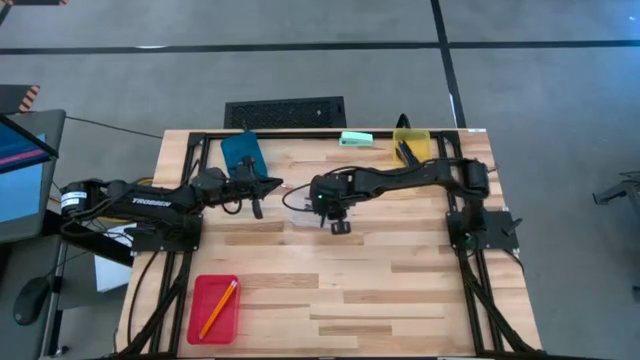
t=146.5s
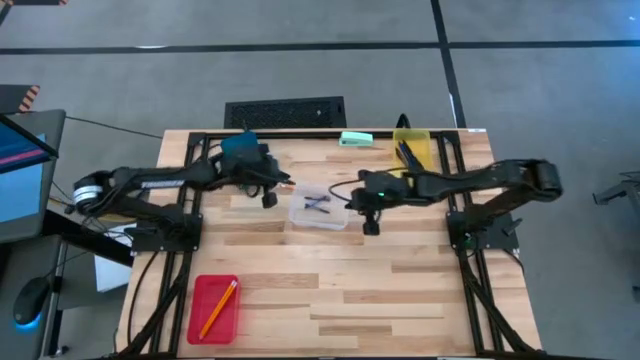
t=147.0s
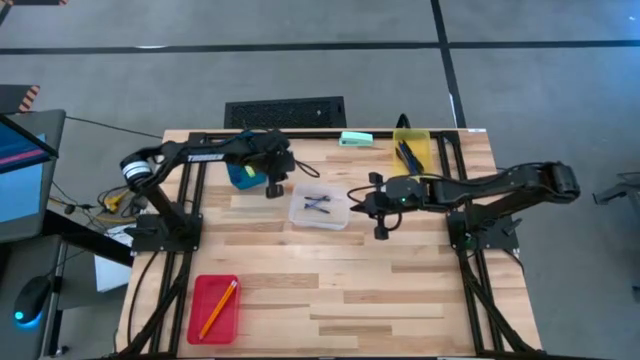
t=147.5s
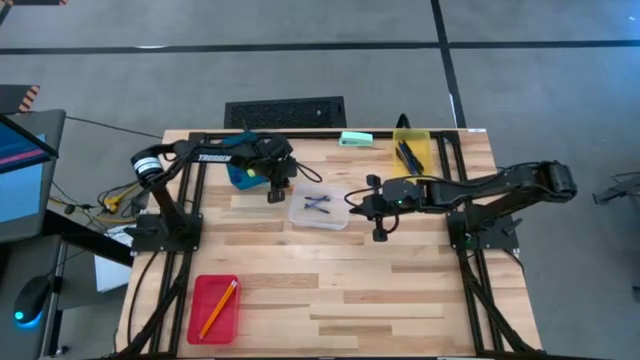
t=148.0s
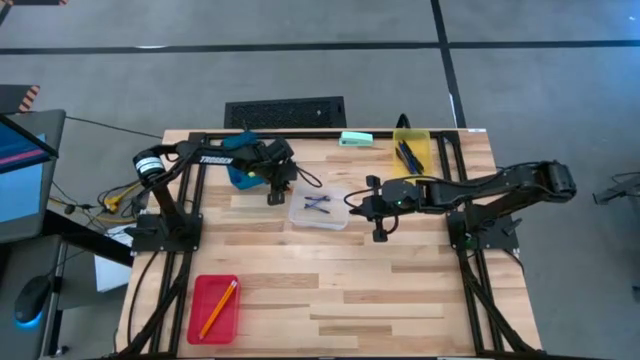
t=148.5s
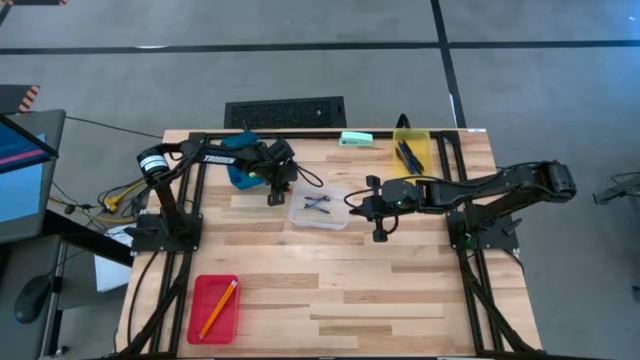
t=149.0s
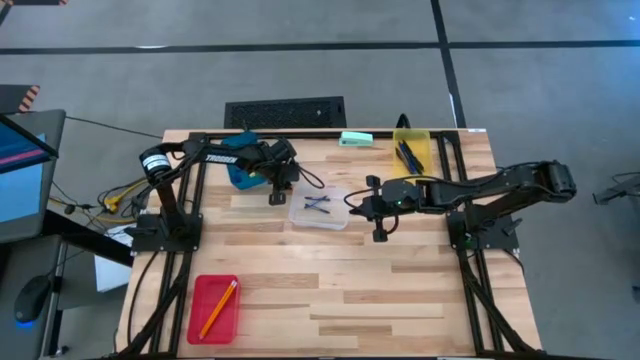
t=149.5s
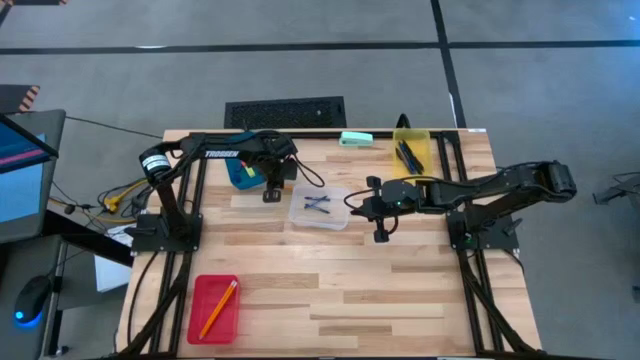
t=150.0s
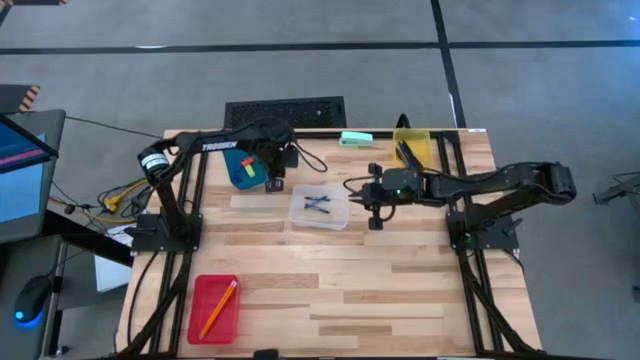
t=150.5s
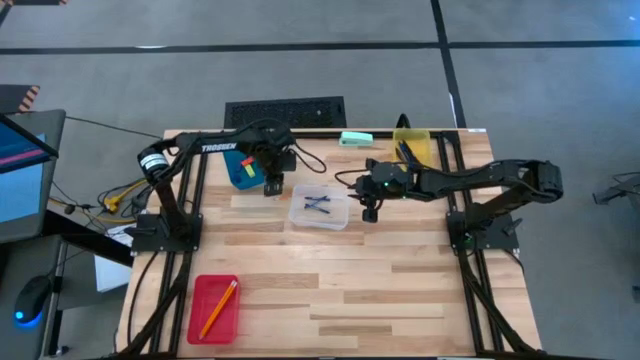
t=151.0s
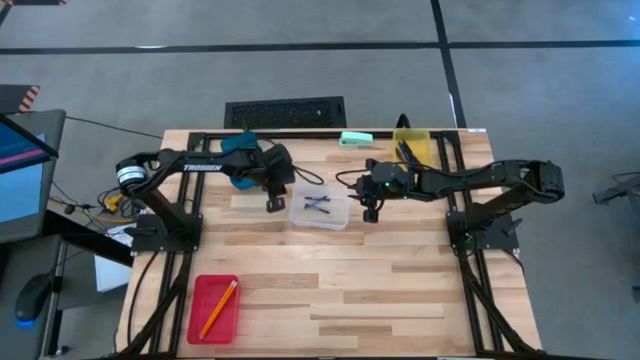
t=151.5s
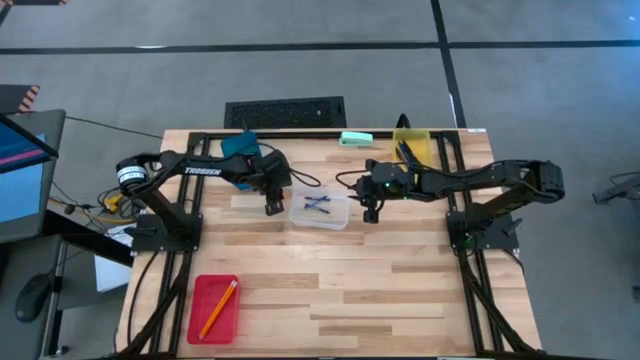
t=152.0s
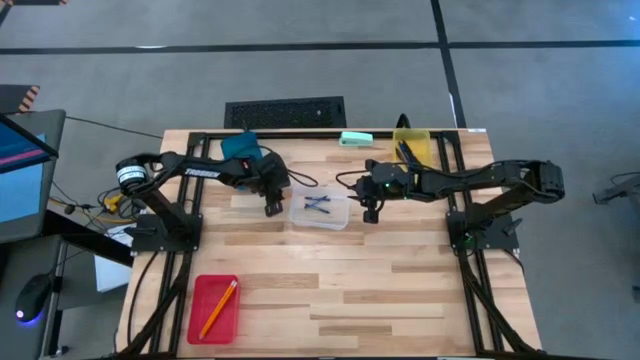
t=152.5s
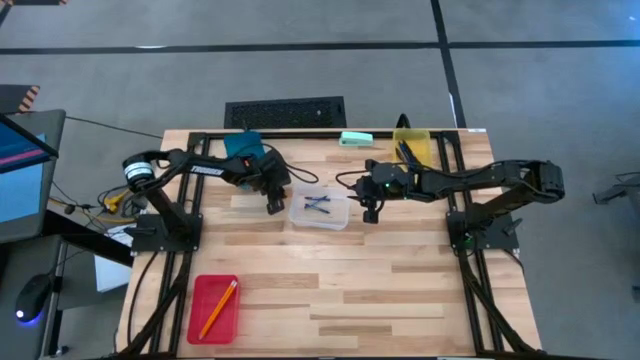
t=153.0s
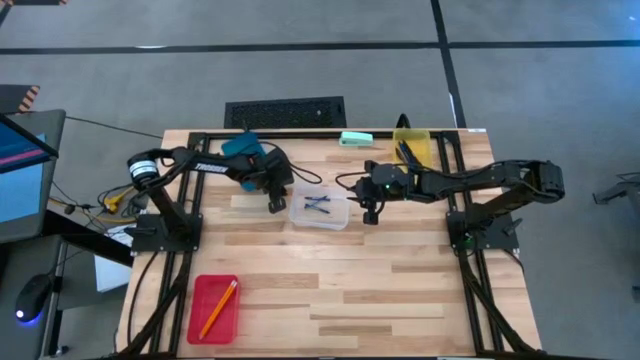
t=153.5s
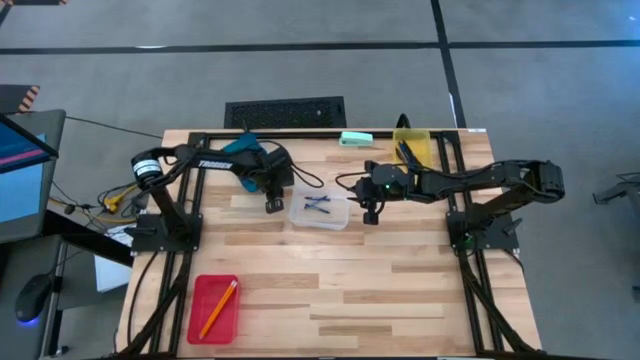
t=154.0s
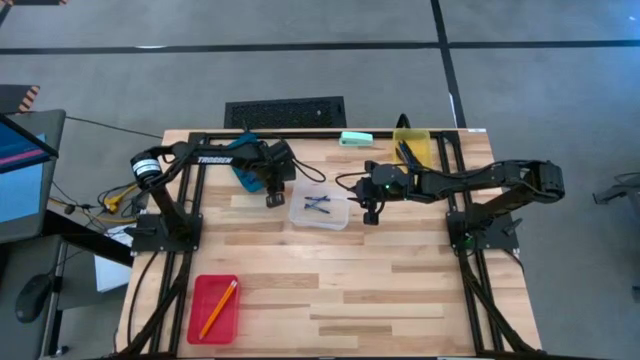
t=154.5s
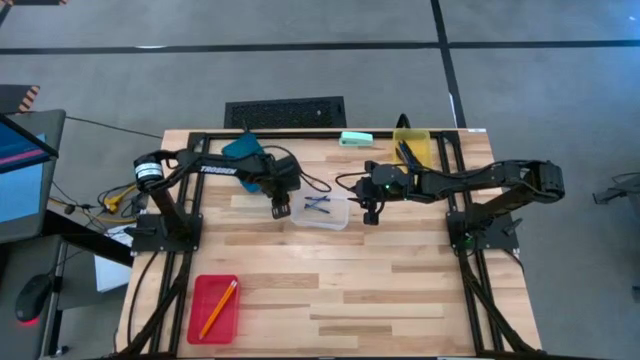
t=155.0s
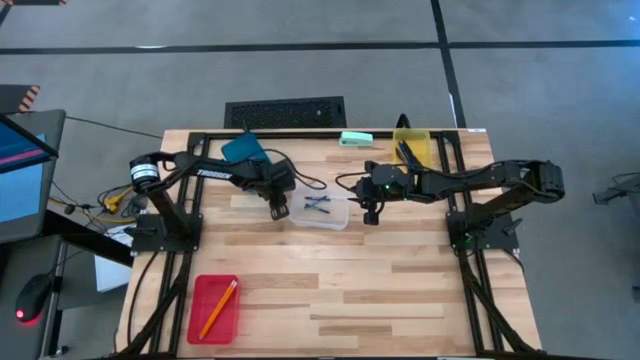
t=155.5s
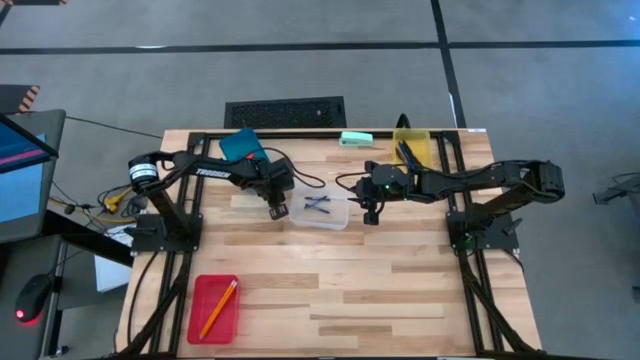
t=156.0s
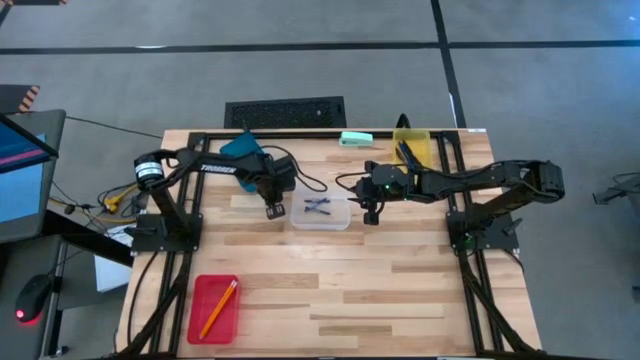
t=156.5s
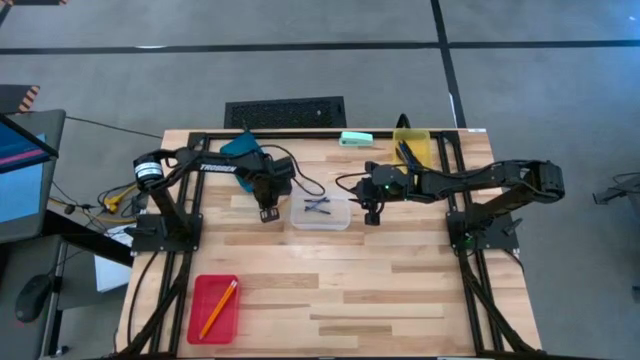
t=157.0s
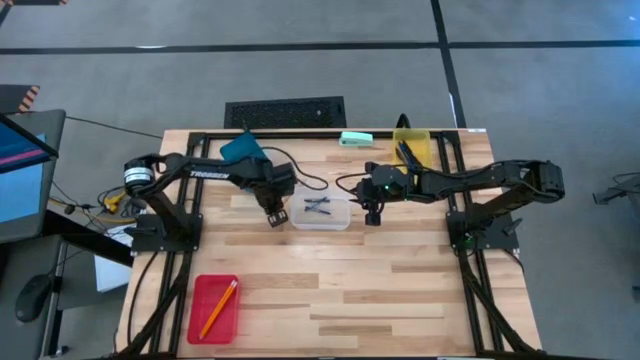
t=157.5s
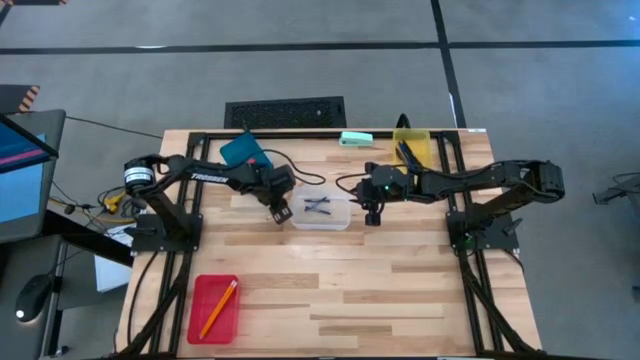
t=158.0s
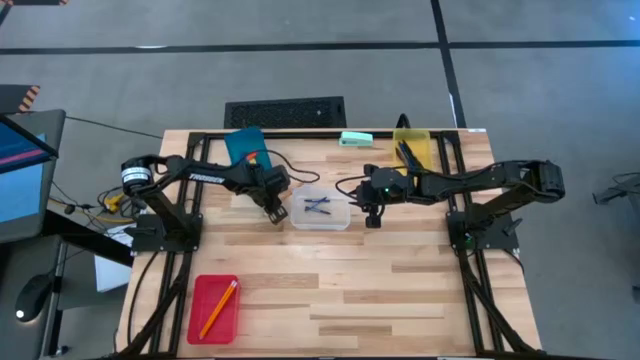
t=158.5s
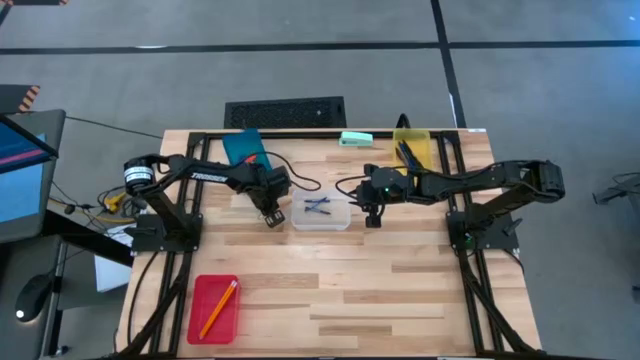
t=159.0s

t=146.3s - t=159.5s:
Task: Sort crayons/erasers/pens/pencils in bins
Put the yellow pencil into the red bin
